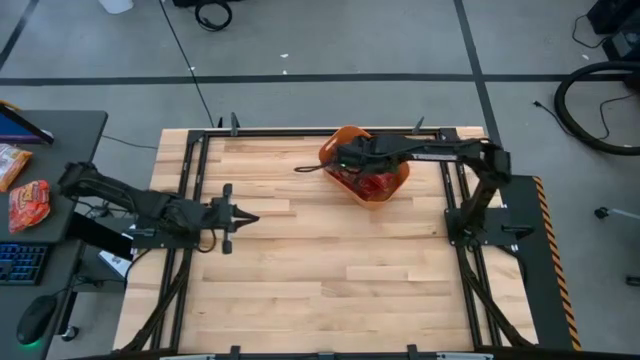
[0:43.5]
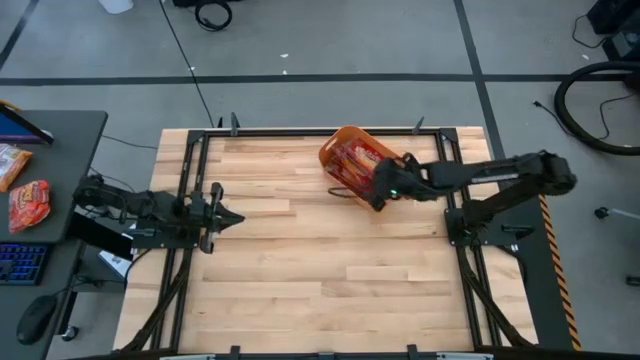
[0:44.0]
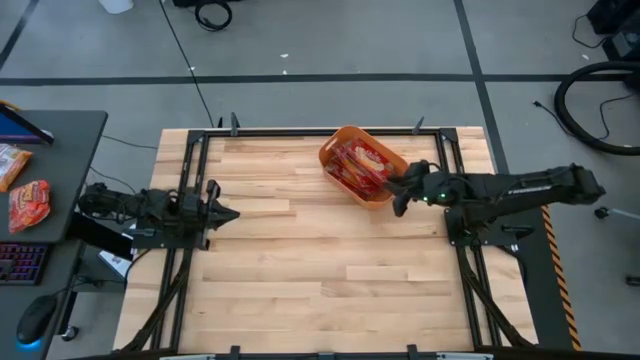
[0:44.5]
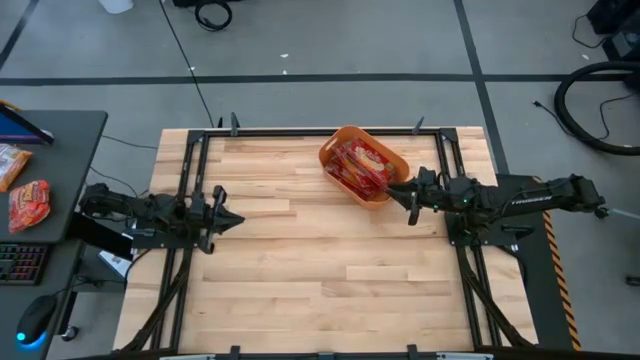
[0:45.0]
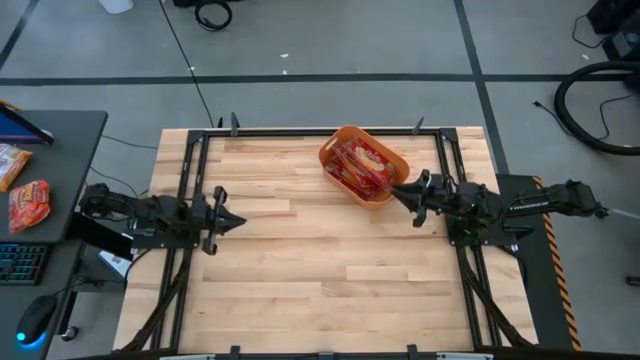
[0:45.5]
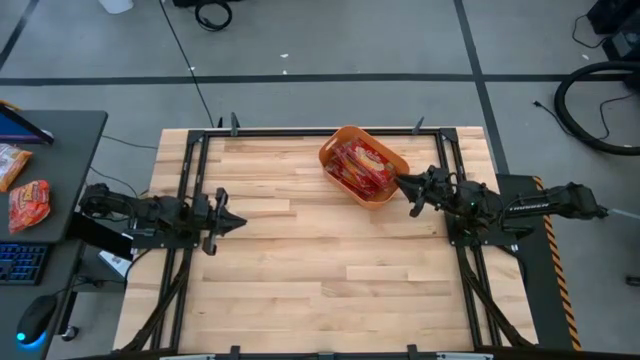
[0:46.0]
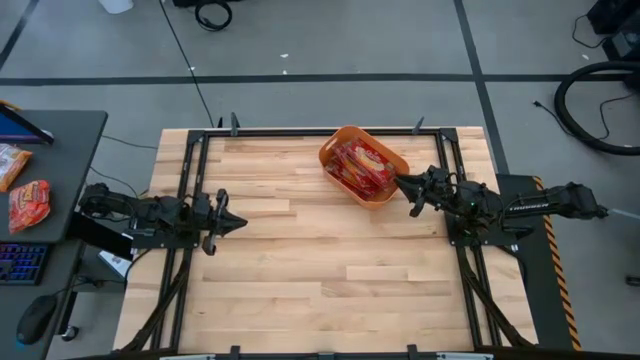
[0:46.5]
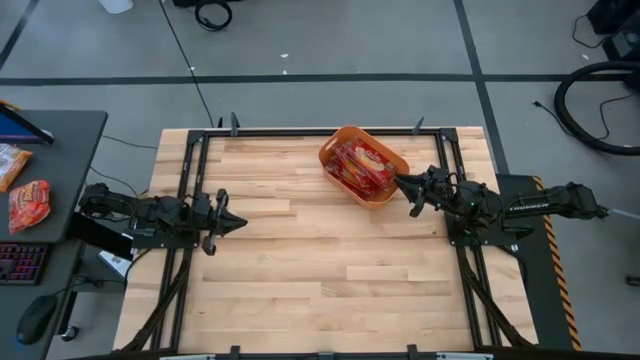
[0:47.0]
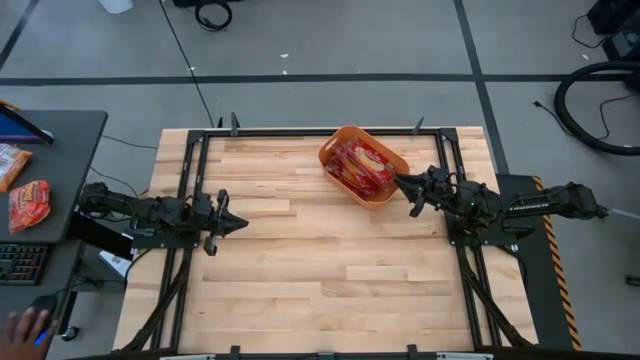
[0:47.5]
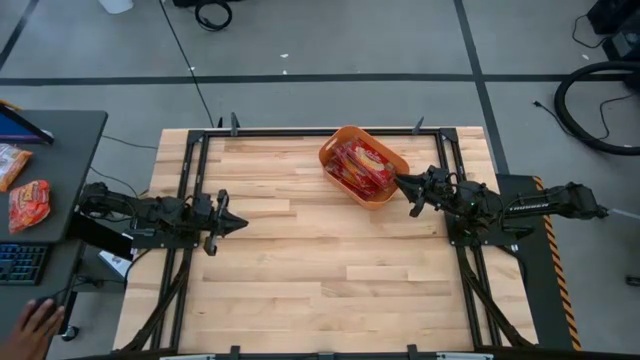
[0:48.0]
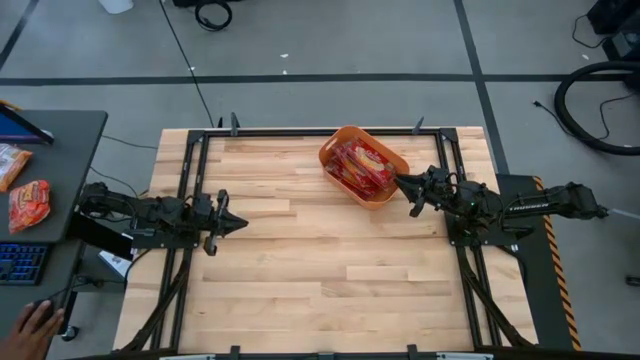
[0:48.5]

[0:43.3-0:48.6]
Task: Sort popcorn bags into baskets
Return to Home Position

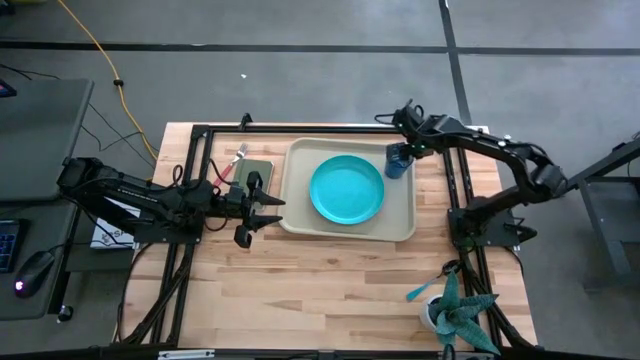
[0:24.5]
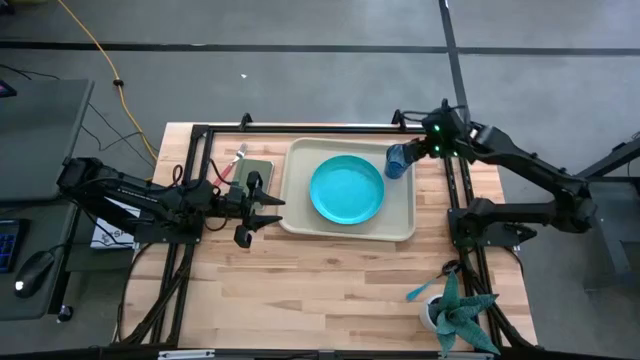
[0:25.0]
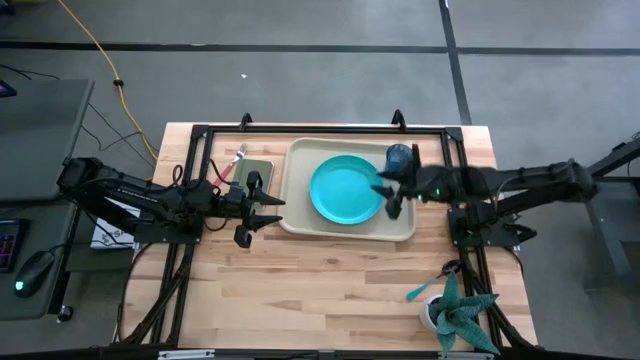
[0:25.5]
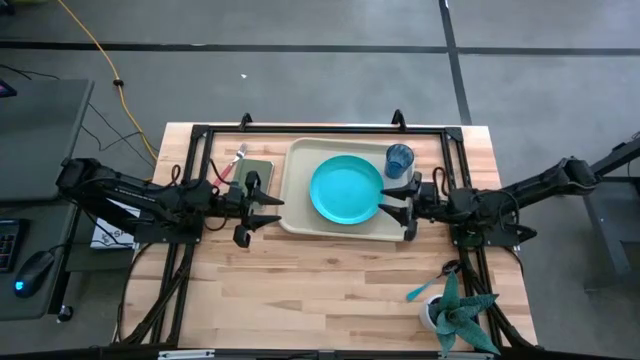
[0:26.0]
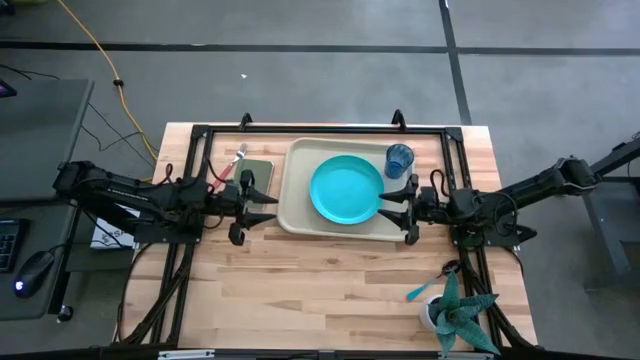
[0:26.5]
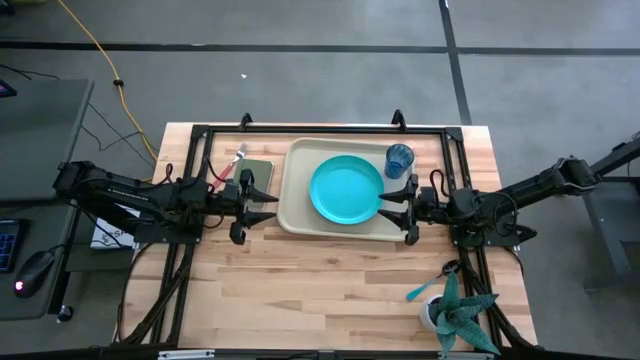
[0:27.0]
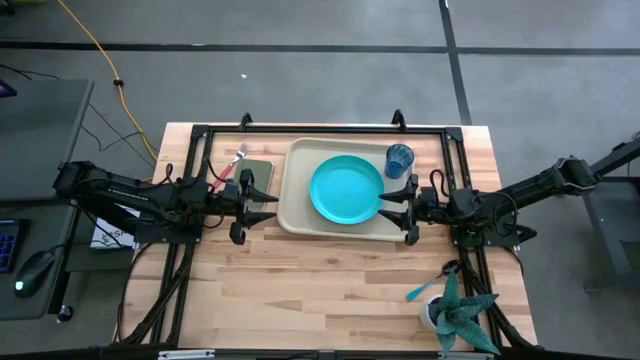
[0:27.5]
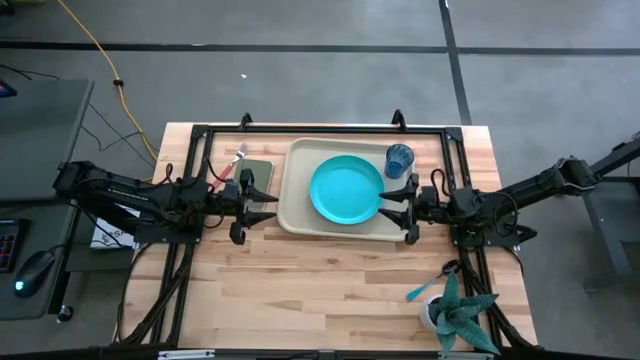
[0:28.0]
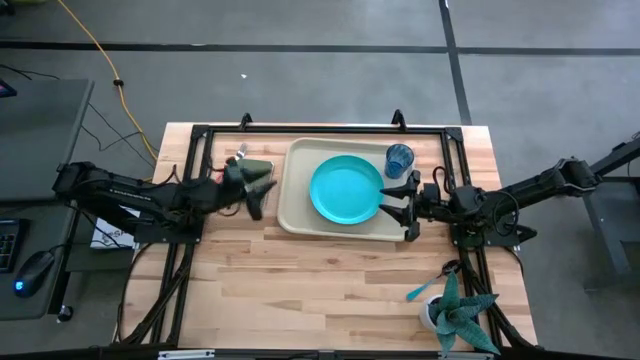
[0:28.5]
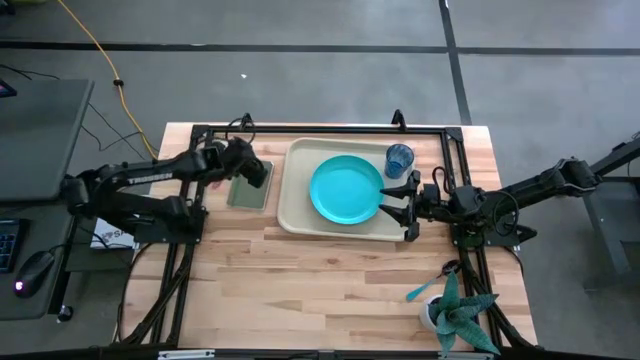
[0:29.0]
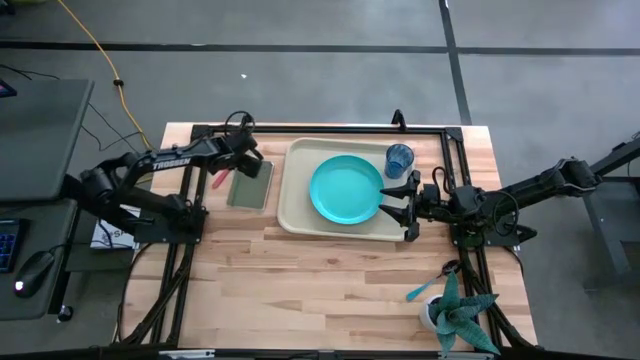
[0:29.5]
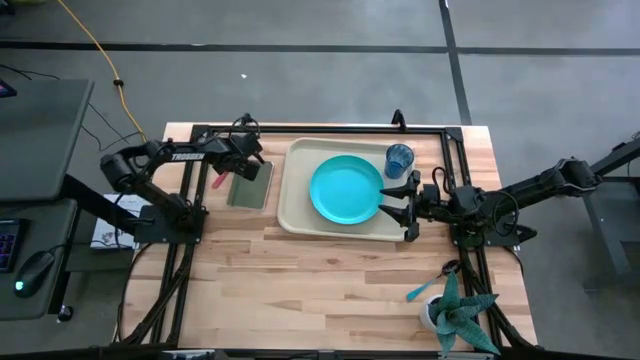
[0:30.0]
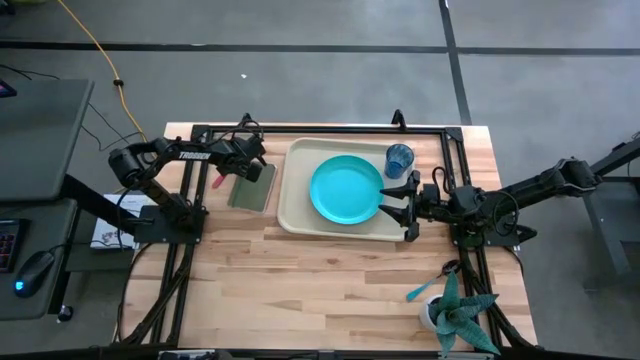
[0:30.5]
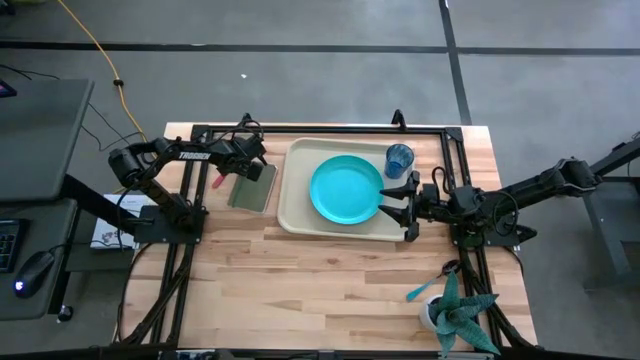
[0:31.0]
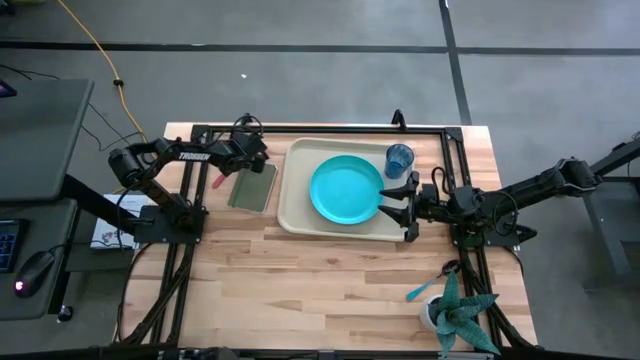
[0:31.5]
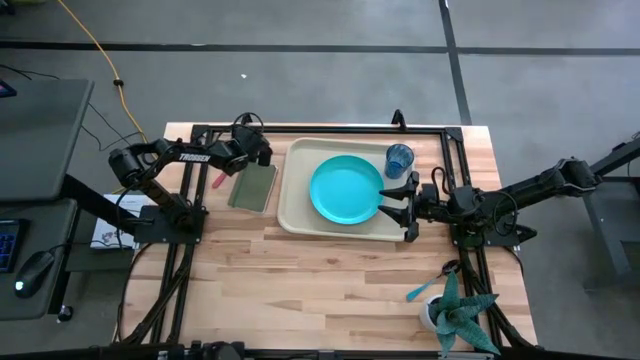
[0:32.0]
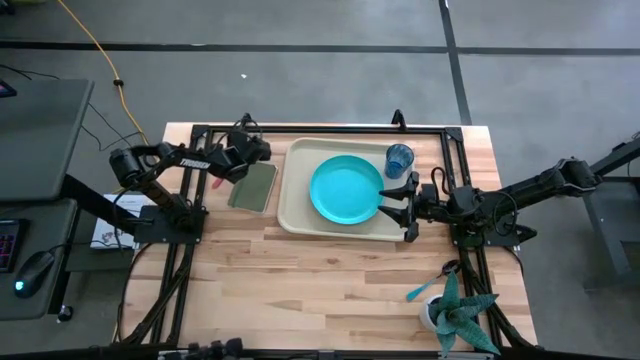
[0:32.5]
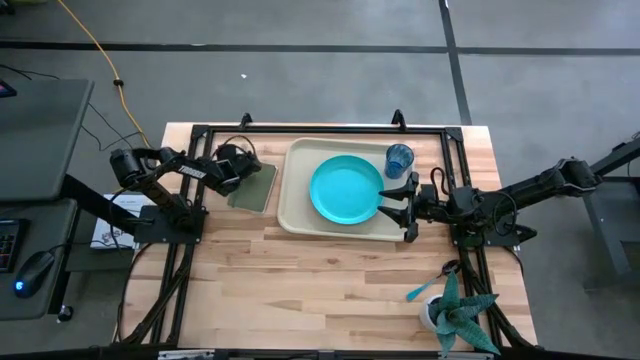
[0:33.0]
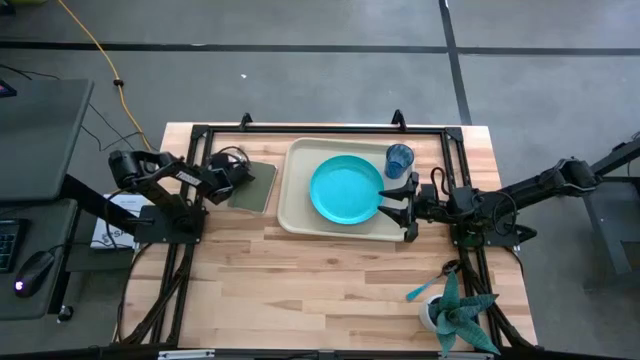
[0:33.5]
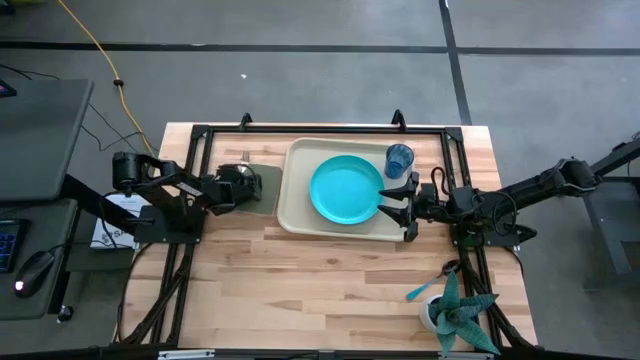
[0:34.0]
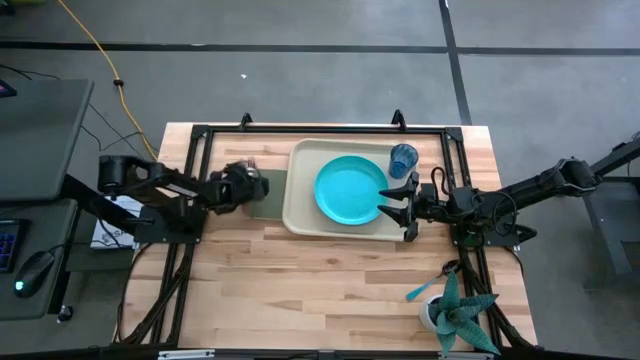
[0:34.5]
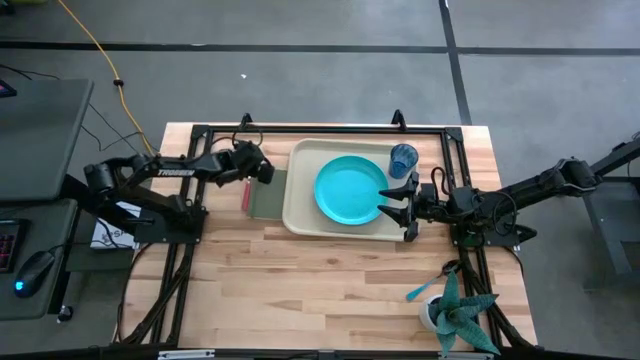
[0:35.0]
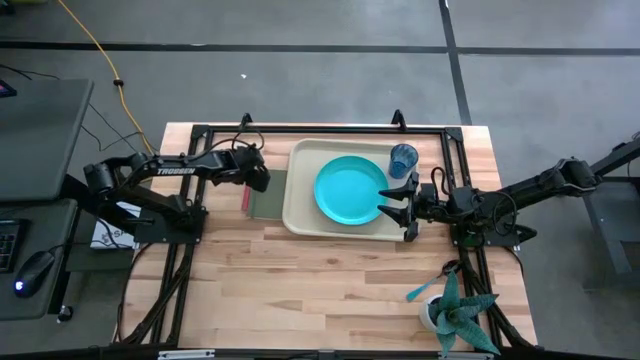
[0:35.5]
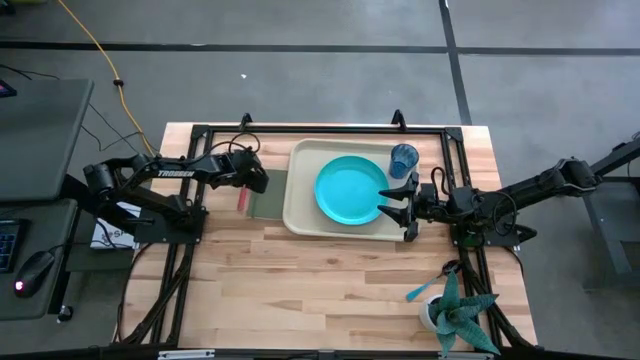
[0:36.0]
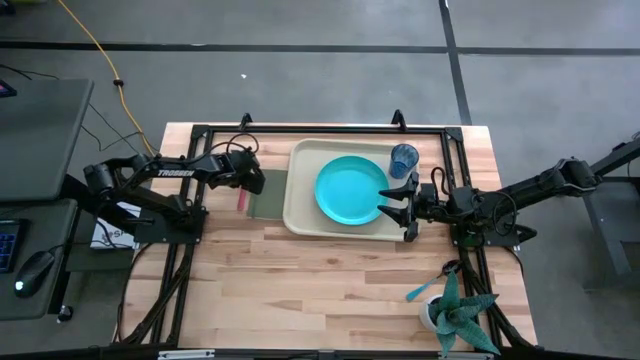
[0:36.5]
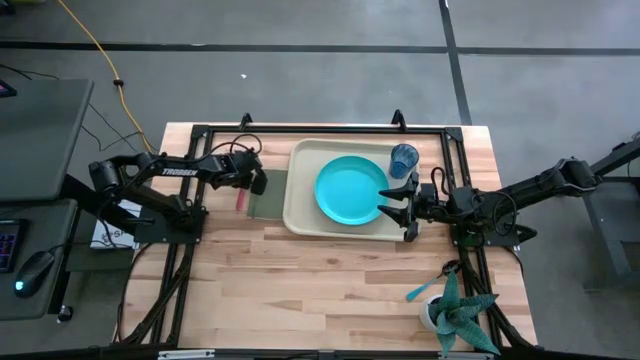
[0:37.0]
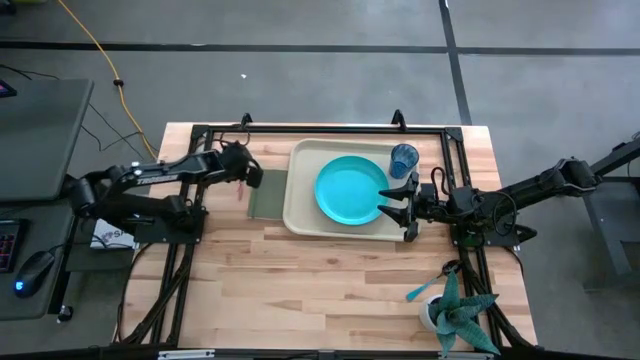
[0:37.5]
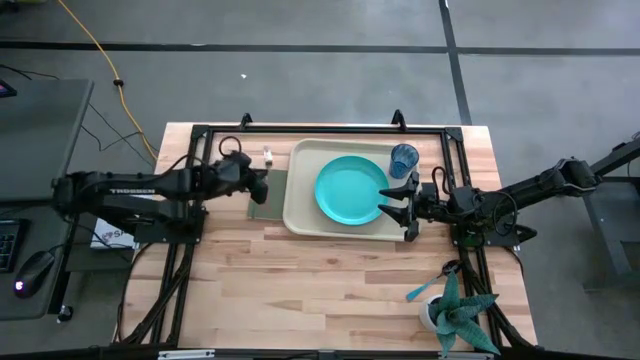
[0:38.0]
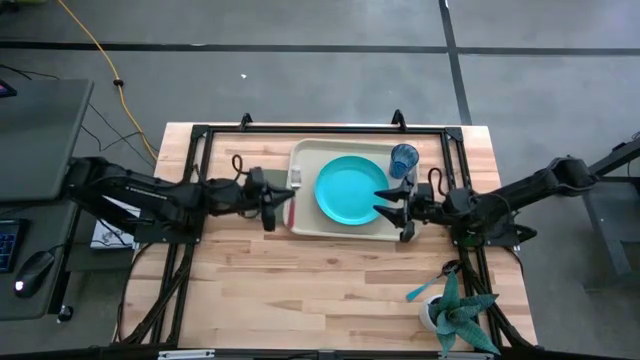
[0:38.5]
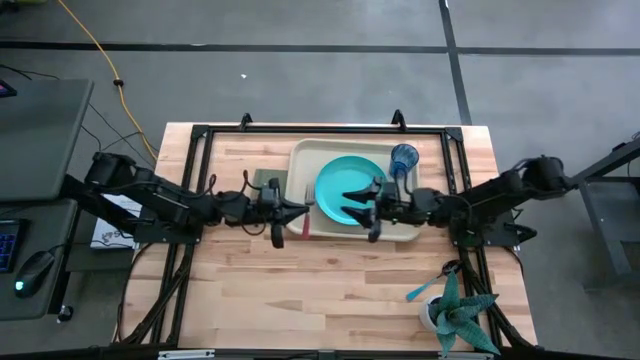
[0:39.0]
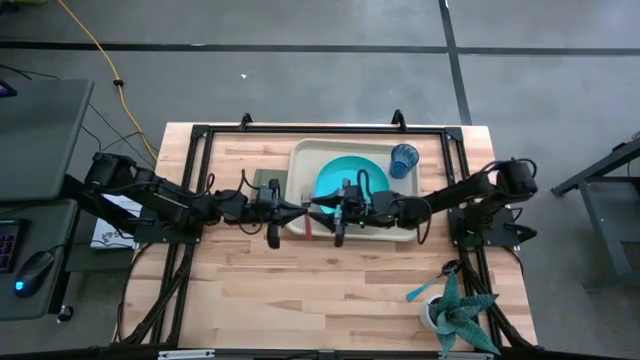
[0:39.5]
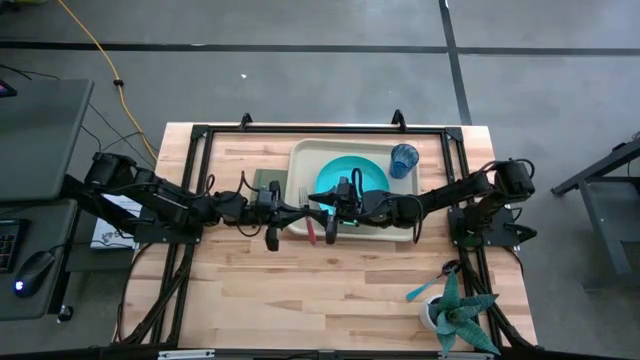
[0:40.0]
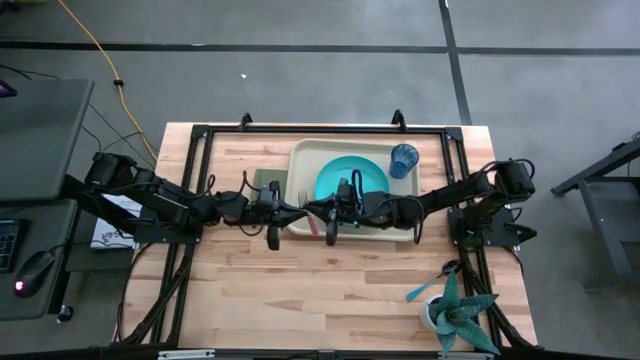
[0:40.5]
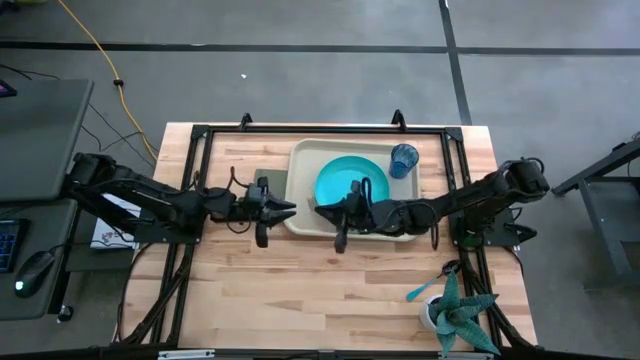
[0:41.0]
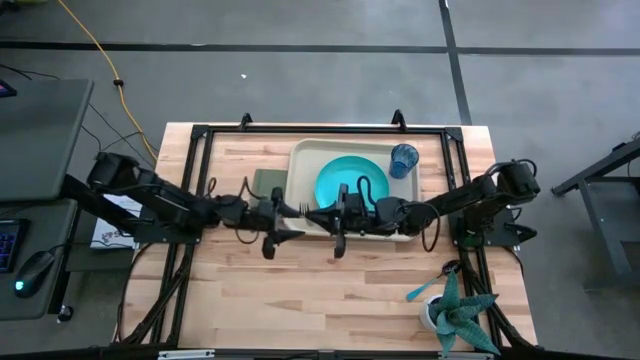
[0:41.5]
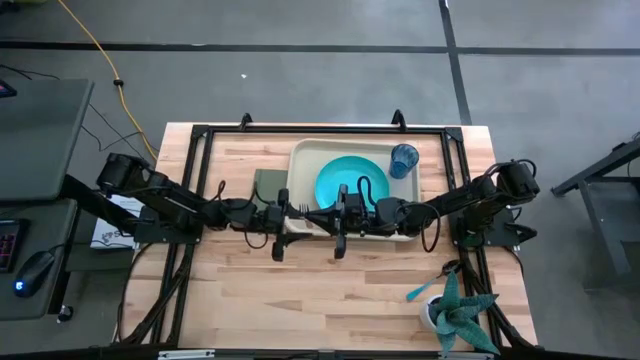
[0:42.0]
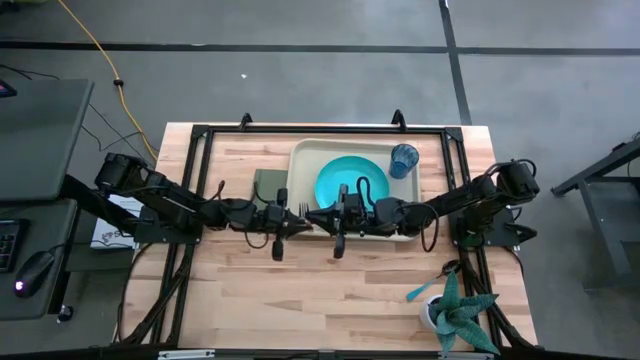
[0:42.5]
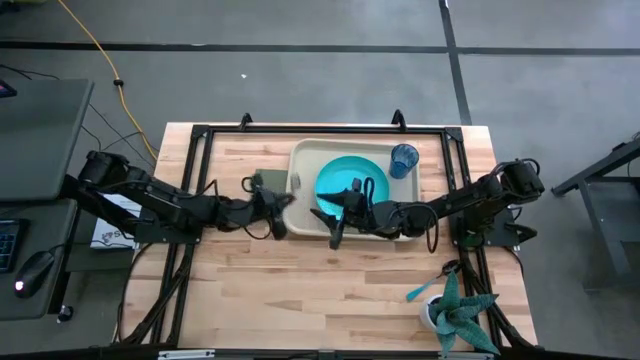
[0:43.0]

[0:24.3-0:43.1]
Task: Pick and place plate/cup/fork/spoon on tray
Put the pink fork on the gray table tray to the left of the light blue plate
